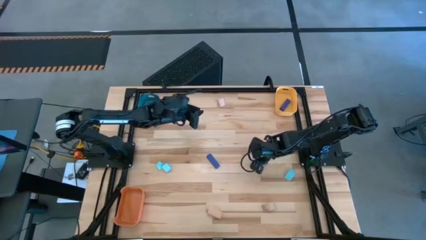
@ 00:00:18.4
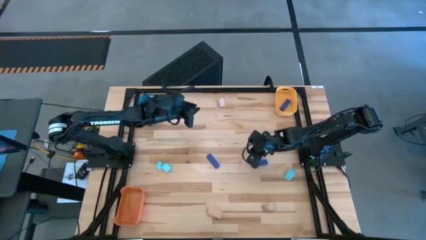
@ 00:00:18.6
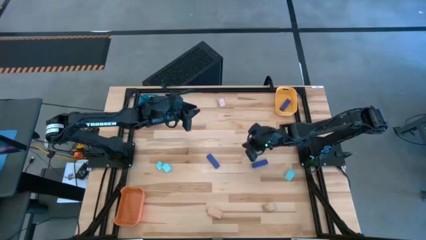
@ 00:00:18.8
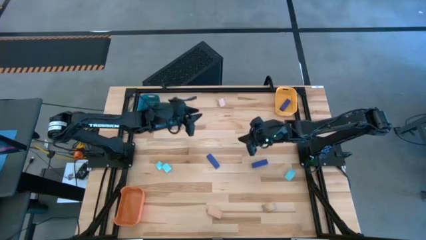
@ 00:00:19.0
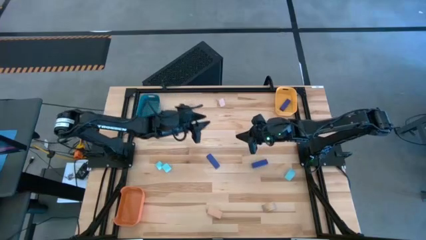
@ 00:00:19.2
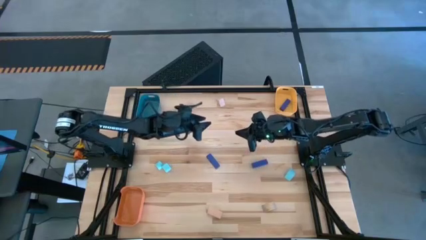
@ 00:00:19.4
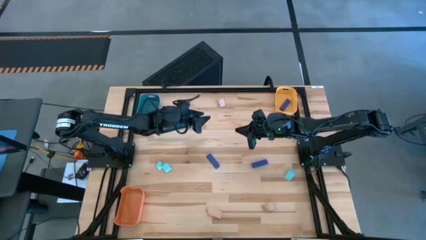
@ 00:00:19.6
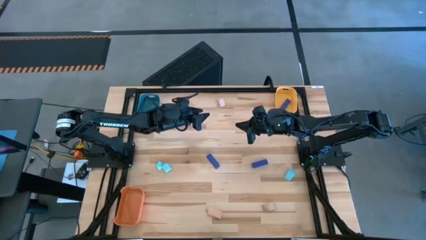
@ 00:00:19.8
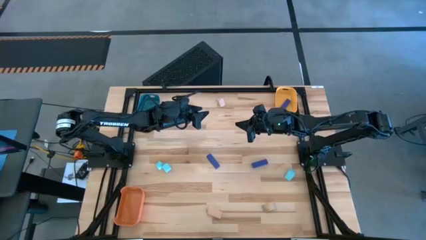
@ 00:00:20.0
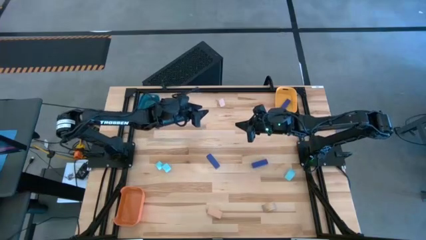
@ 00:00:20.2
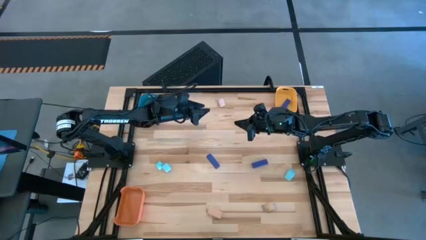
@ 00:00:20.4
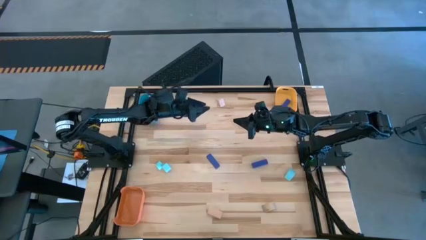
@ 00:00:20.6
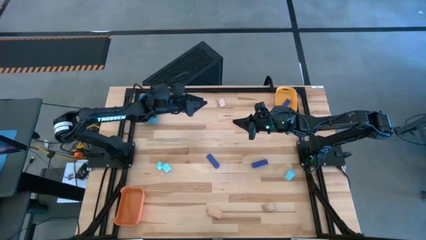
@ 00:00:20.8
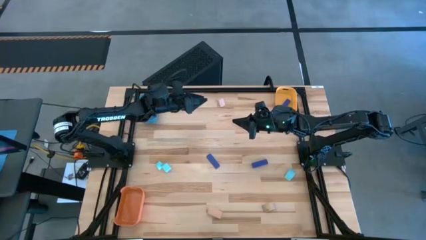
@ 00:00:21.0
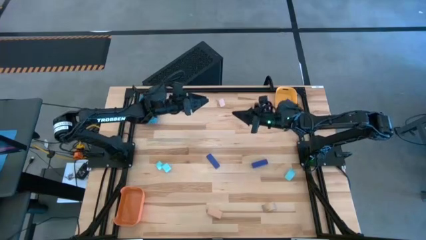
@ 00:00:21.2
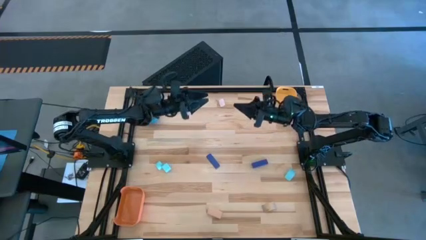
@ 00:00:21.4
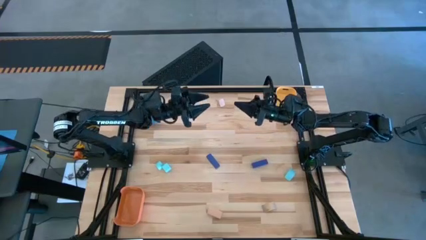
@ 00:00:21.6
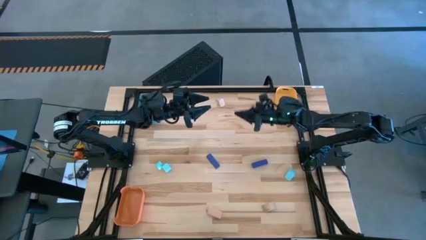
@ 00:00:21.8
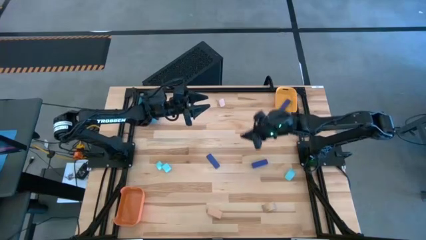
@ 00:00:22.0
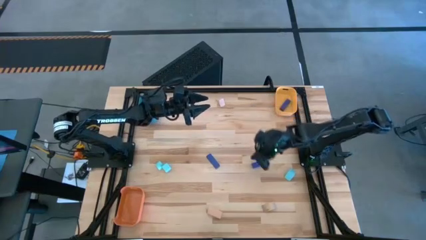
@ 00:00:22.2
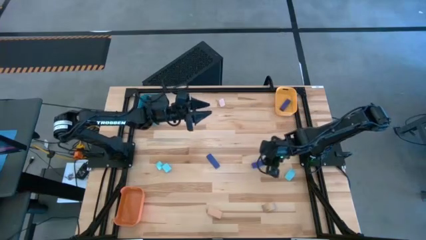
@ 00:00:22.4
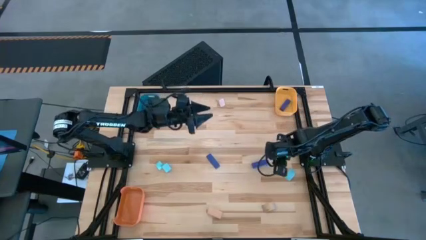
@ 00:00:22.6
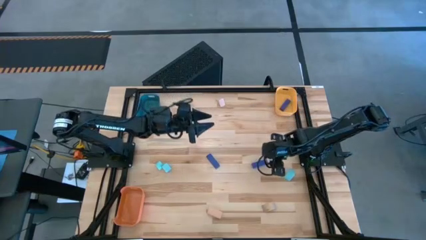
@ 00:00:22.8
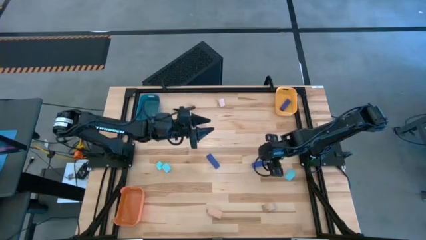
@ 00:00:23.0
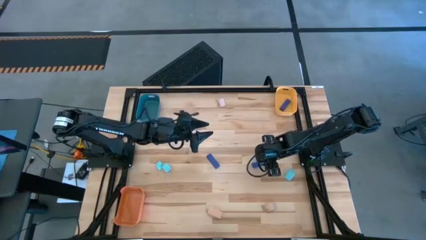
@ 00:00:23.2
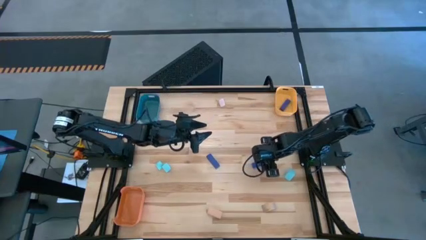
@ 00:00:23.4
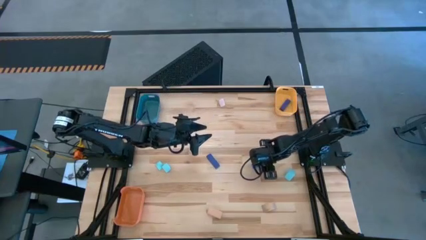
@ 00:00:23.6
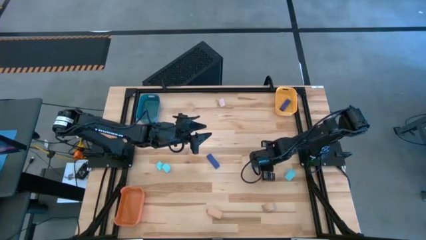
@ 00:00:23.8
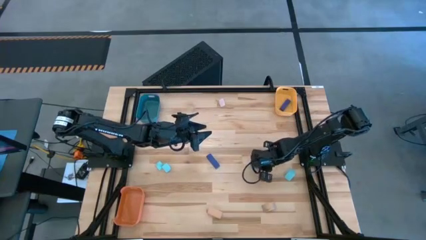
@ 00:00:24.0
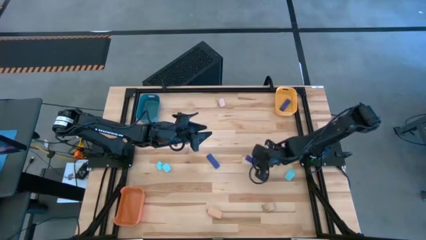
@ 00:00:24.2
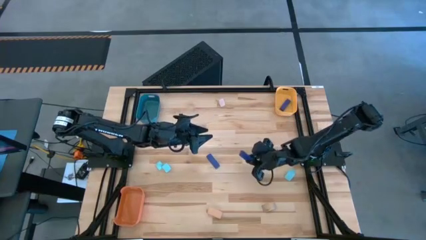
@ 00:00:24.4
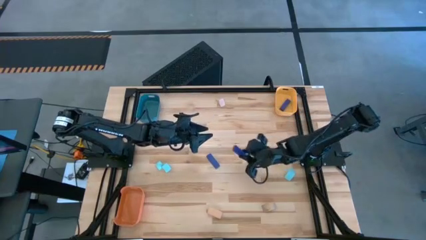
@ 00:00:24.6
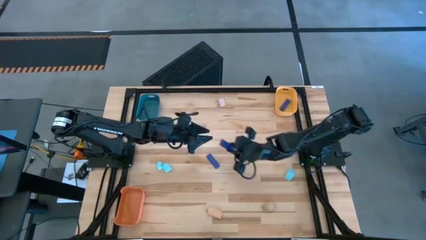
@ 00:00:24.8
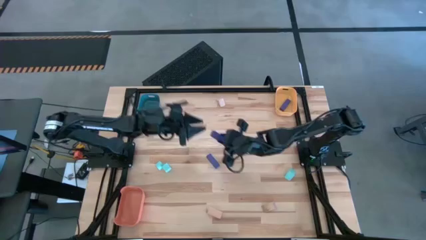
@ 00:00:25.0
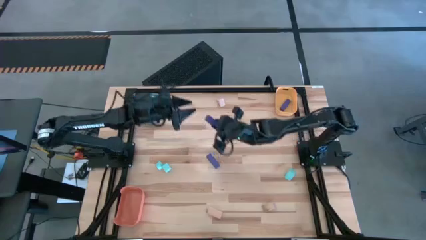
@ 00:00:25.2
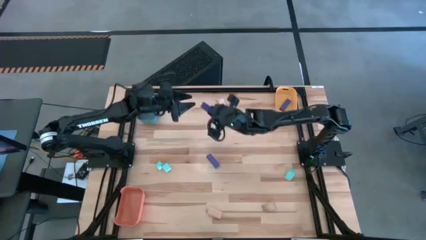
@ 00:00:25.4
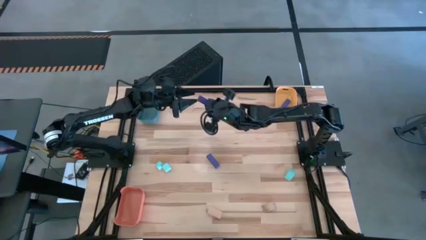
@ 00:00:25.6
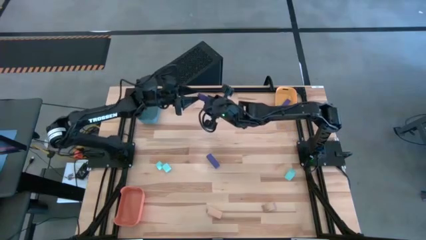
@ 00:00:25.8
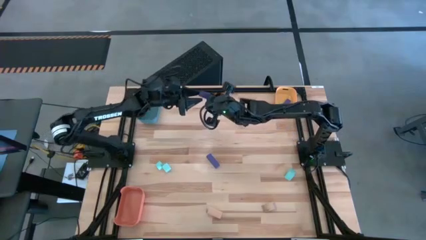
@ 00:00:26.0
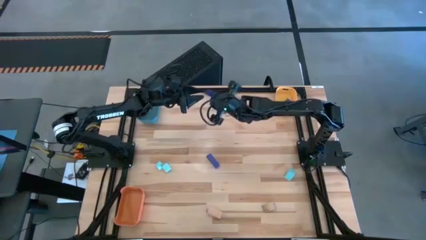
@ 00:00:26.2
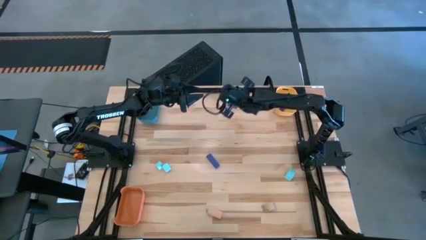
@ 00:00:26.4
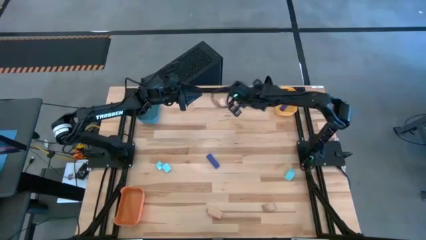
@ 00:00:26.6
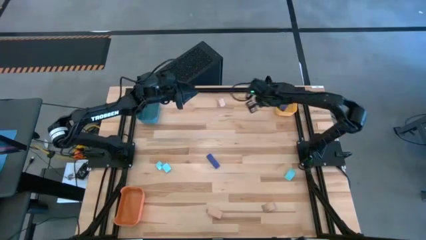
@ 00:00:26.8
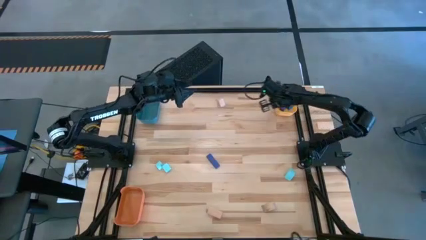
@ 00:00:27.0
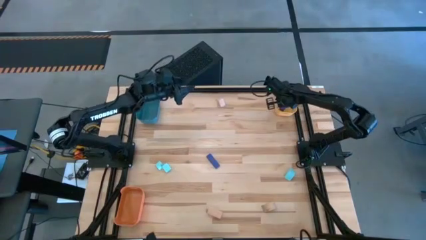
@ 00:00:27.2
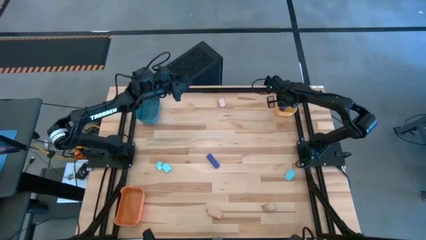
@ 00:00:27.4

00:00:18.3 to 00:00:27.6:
Task: Sort & place blocks by color
Put the right blue block into the yellow bin

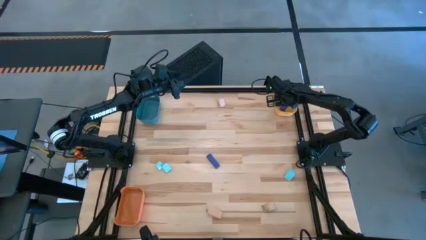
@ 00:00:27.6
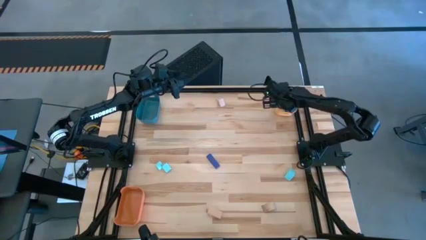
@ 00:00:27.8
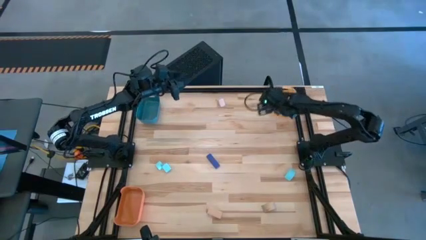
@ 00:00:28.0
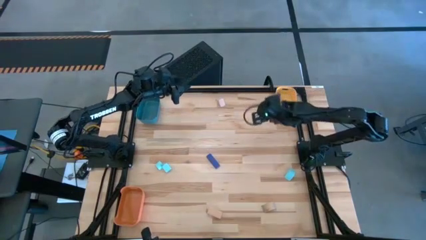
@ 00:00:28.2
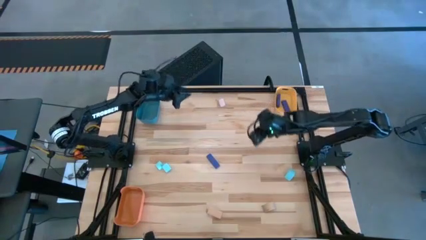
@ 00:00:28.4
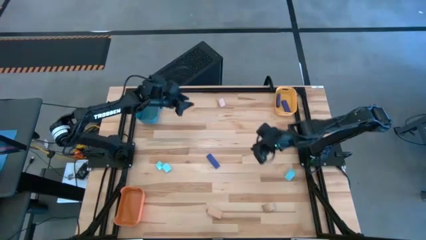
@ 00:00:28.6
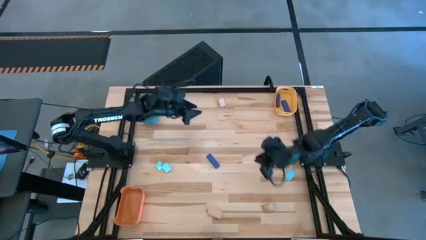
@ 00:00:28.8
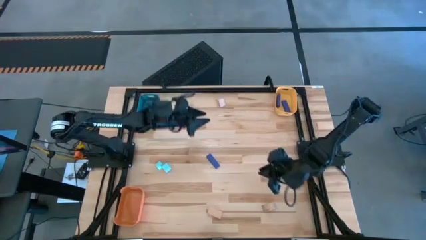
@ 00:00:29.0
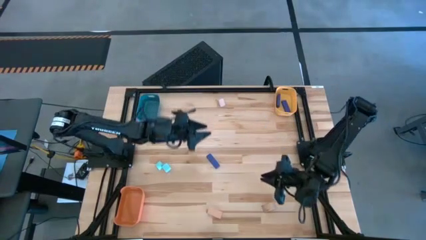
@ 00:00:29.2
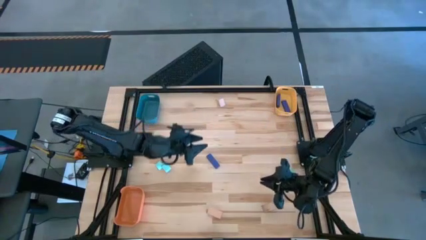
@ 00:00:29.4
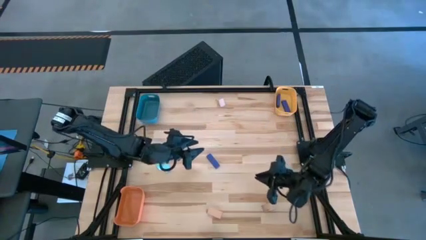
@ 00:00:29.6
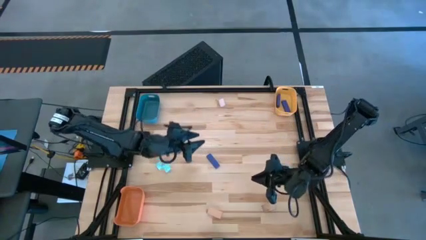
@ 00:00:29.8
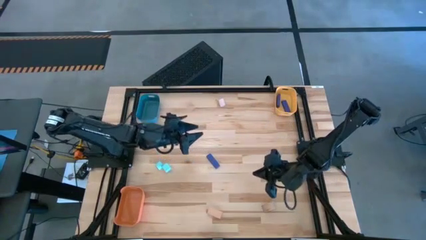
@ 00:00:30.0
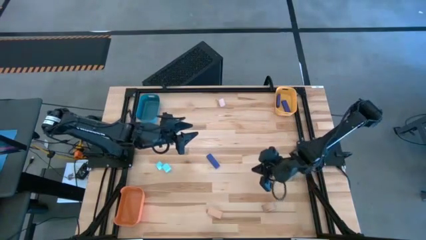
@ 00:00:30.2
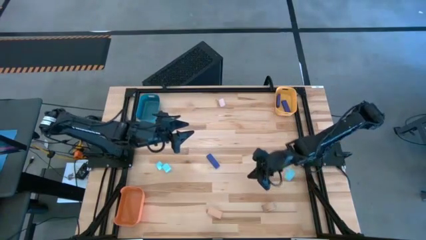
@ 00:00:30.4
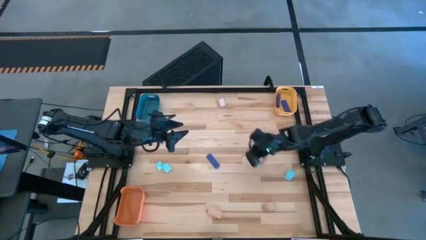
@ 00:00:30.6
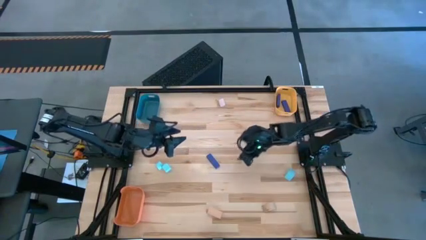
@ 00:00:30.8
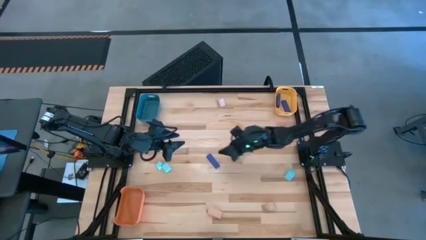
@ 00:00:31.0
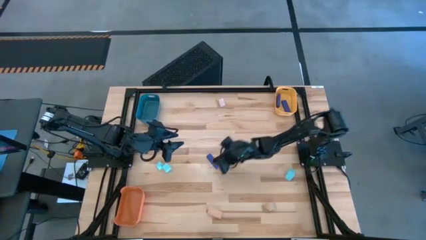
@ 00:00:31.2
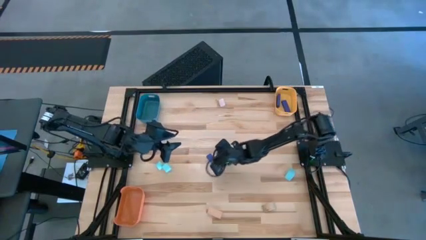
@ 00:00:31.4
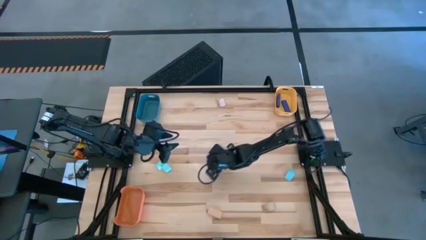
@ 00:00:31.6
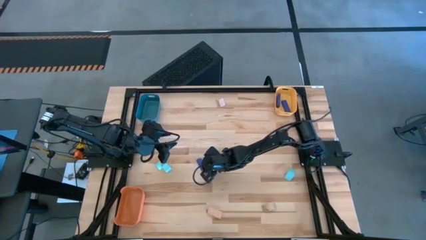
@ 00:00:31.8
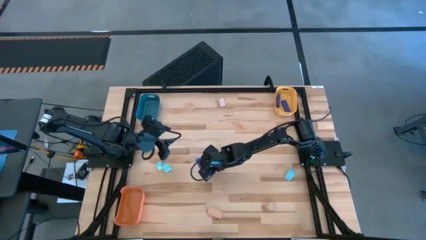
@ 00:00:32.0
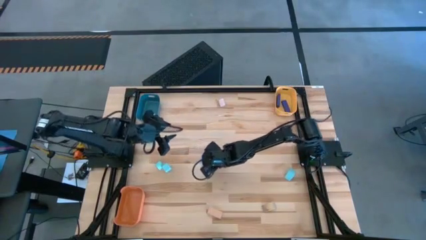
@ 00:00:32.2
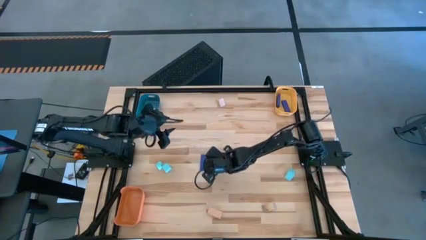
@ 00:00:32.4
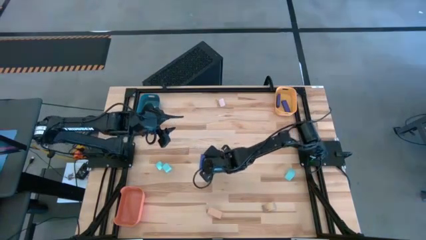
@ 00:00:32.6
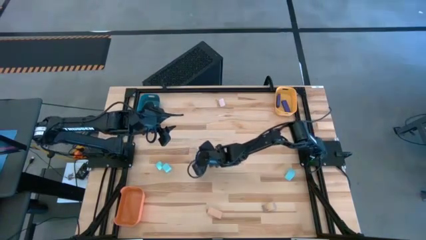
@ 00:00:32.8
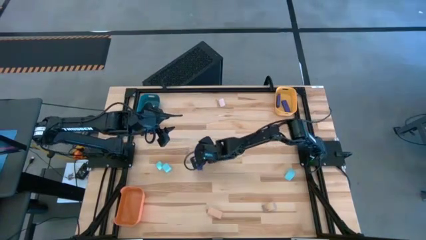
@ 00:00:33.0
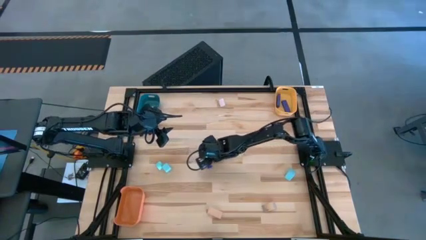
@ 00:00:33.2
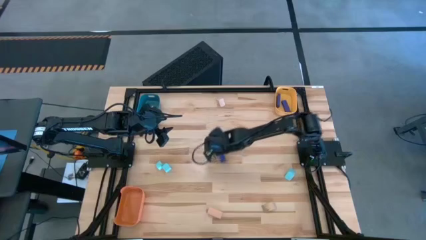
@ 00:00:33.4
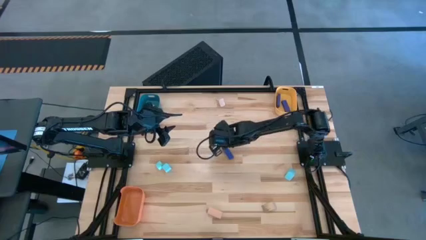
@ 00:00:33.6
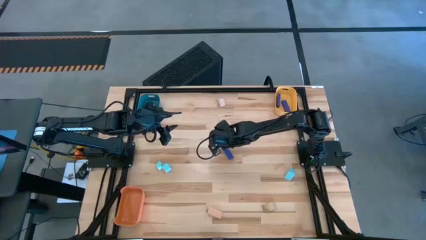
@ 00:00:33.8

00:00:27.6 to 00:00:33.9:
Put the blue block into the yellow bin

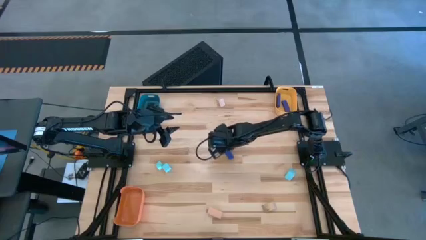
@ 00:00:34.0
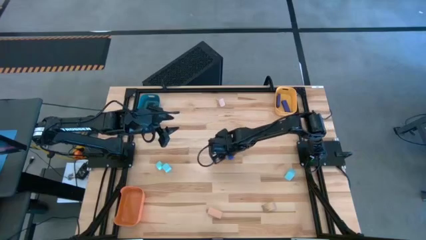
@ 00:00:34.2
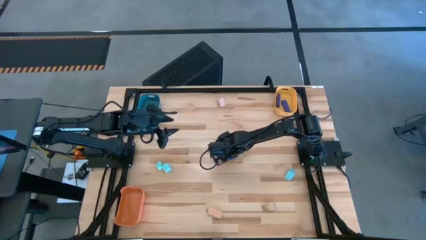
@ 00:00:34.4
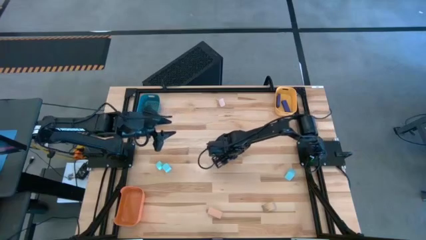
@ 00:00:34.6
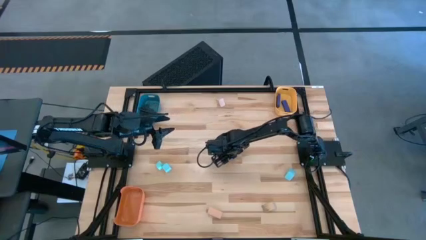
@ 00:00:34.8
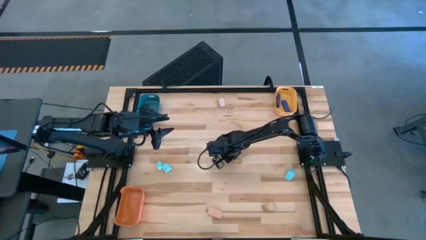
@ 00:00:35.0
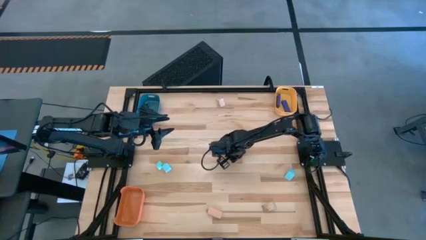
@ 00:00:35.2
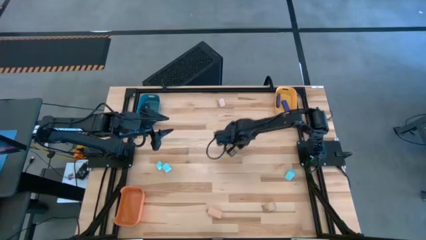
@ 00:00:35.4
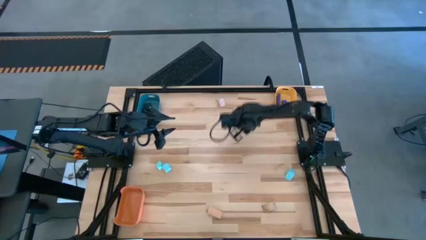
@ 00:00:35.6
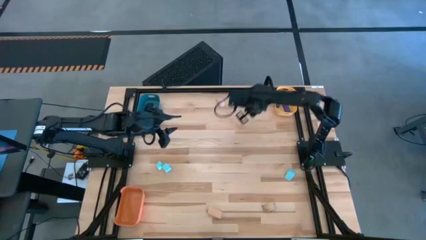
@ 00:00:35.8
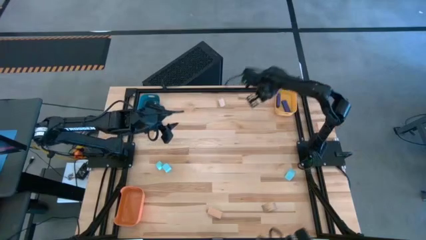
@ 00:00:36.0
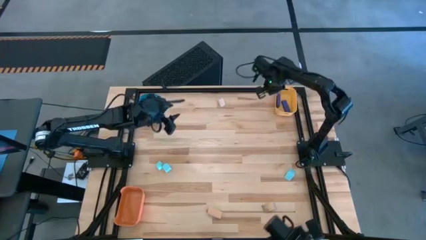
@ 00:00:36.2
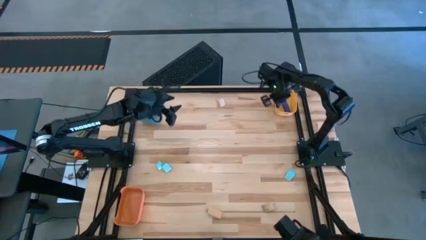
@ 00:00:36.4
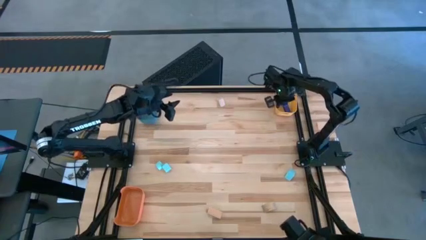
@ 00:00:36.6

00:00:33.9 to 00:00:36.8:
Put the blue block into the yellow bin
